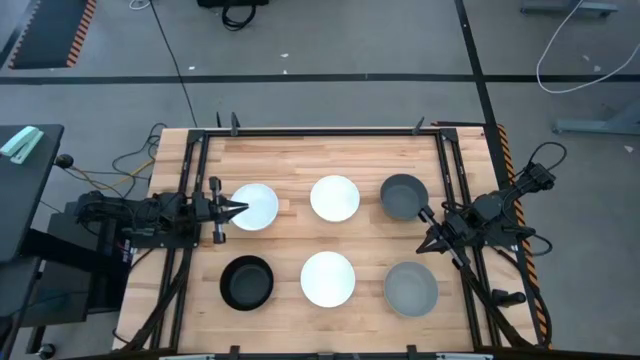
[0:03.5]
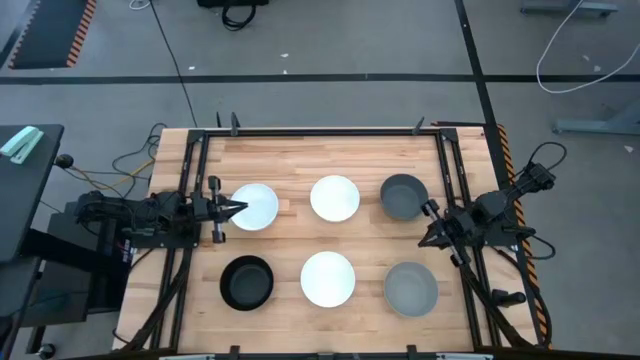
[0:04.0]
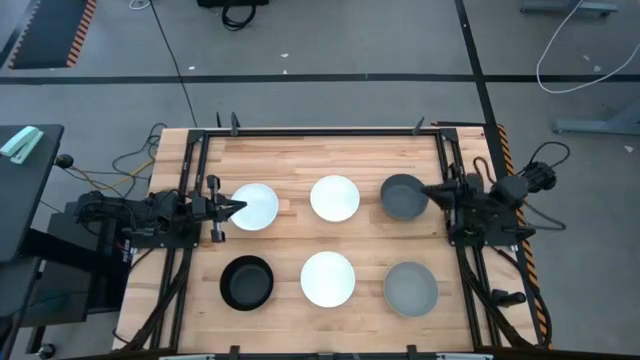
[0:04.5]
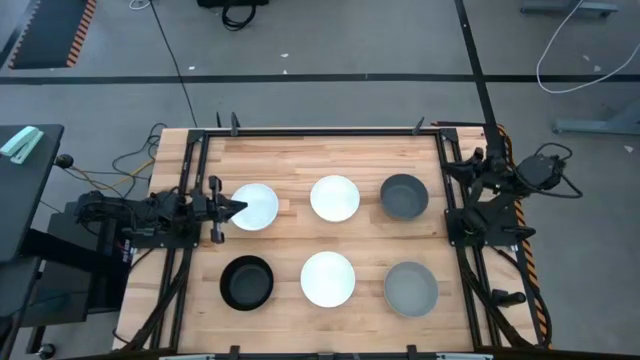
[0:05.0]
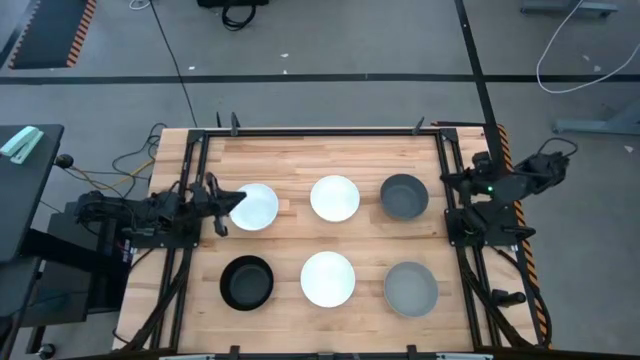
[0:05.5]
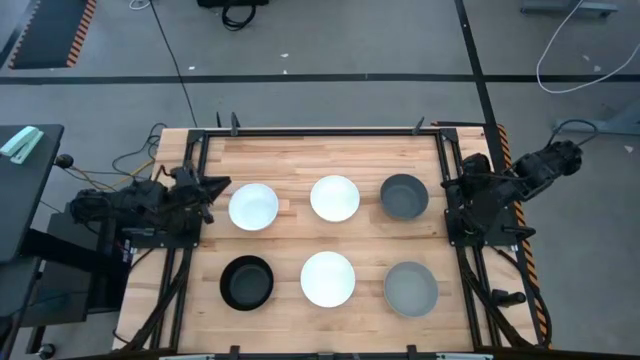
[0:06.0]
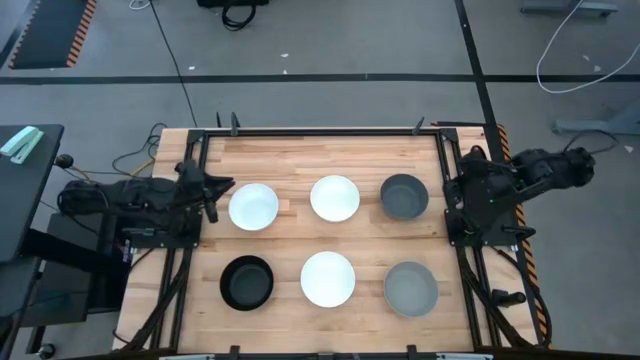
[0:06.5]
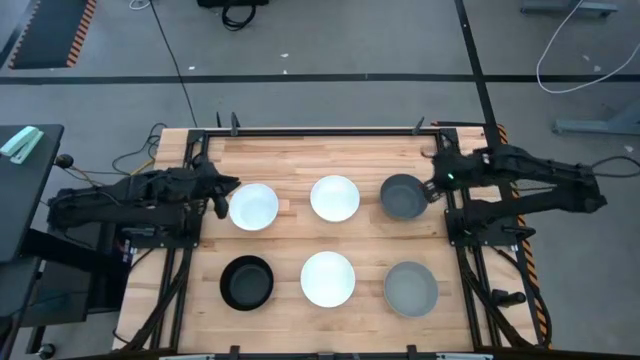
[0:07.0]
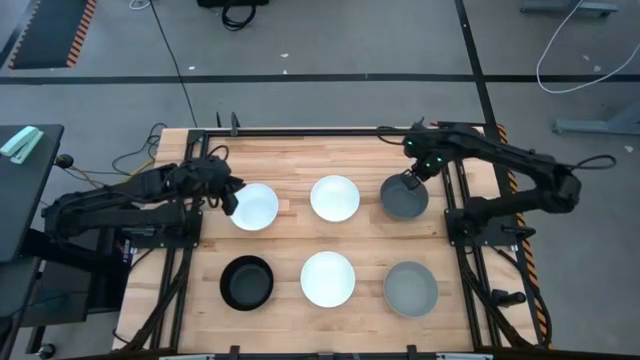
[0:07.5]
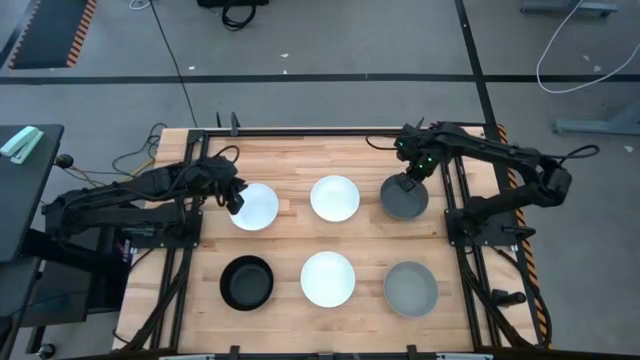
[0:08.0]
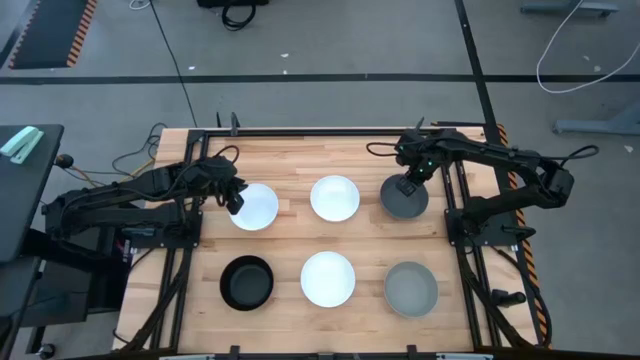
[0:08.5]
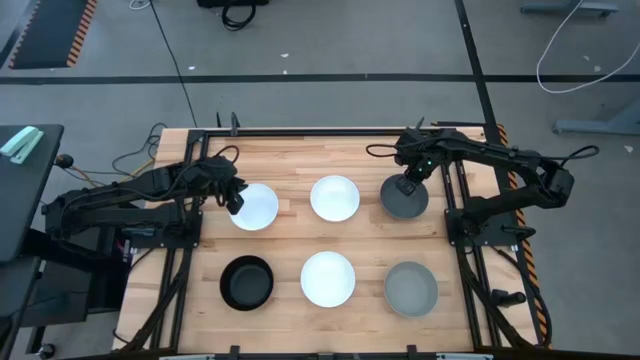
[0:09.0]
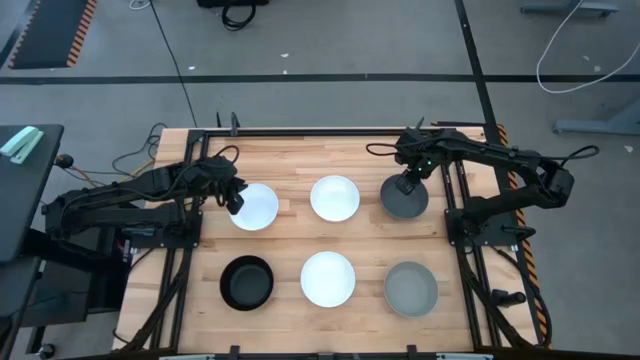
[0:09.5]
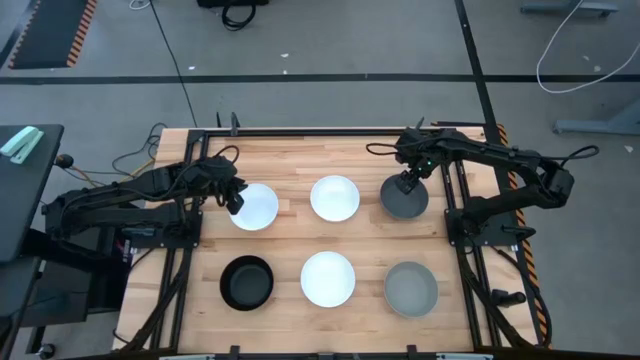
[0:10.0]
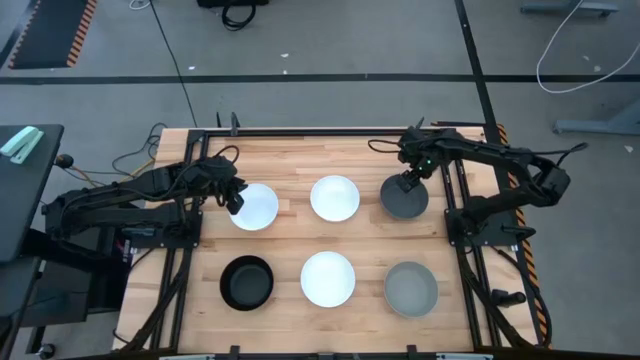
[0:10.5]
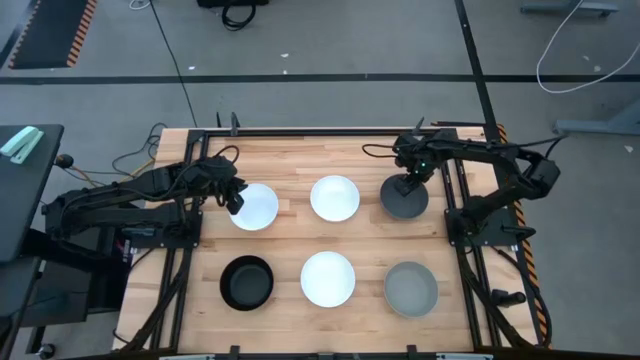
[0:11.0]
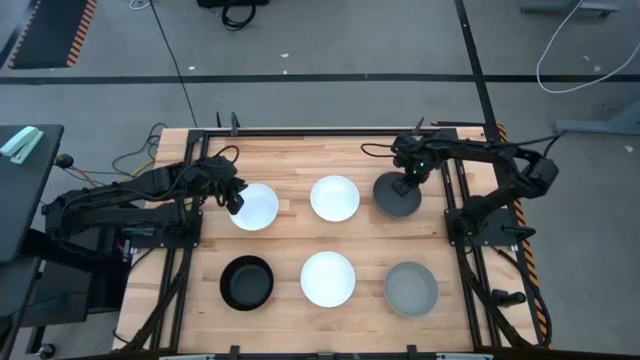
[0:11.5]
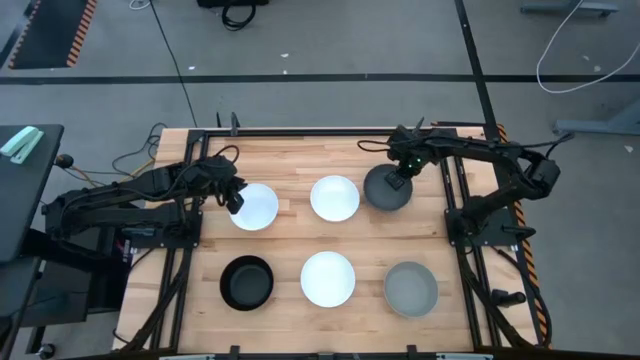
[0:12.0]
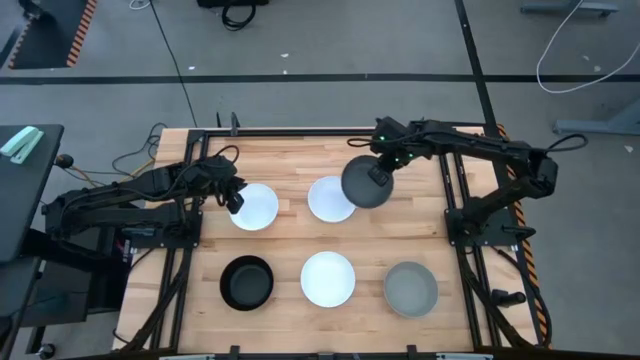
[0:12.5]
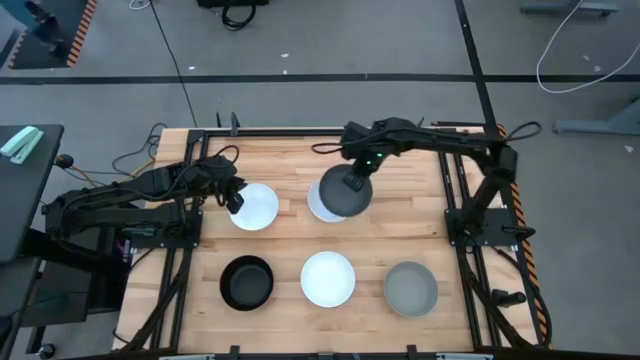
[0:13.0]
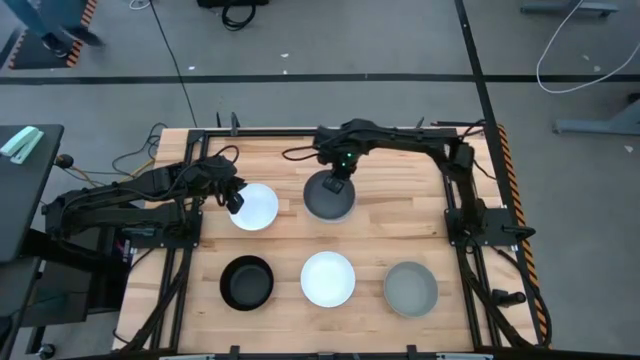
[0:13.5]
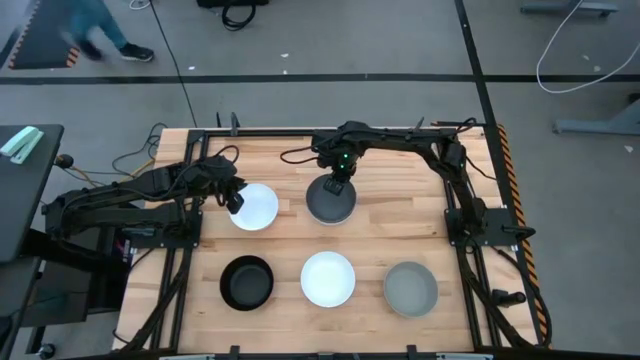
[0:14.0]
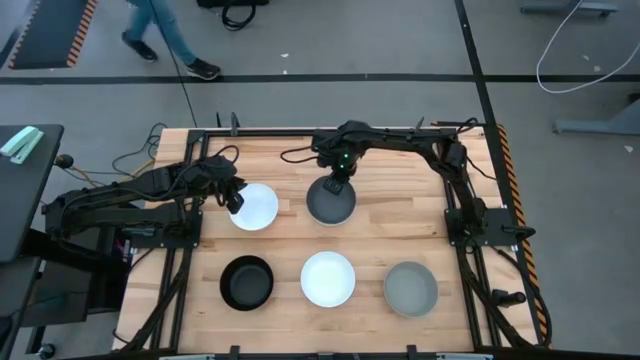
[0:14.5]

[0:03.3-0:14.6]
Task: Nest bowls inside each other
Stack the dark gray bowl on the top right white bowl

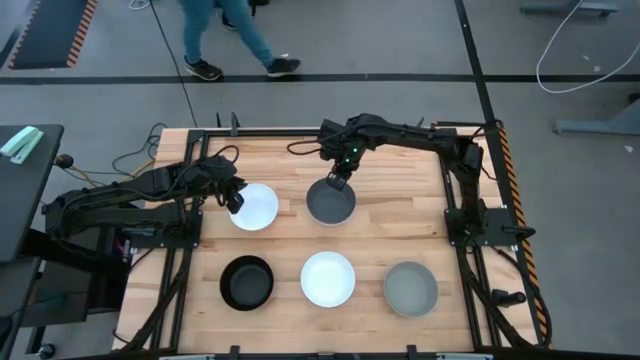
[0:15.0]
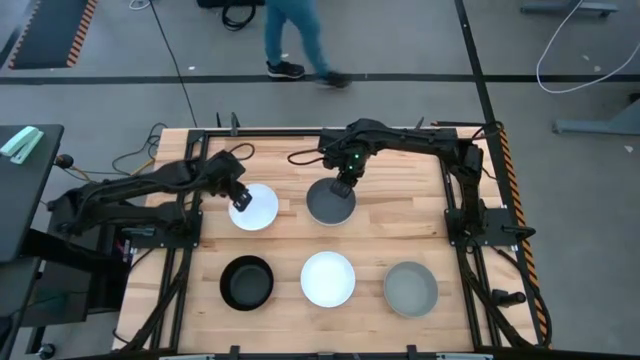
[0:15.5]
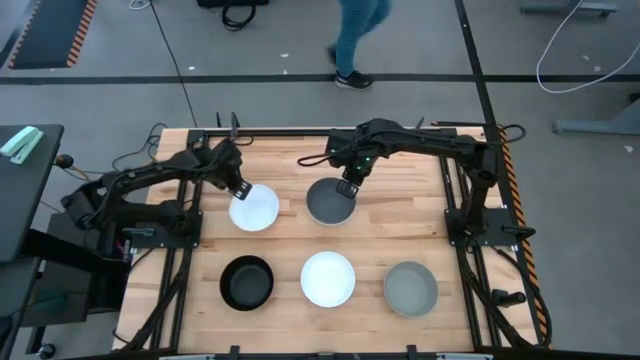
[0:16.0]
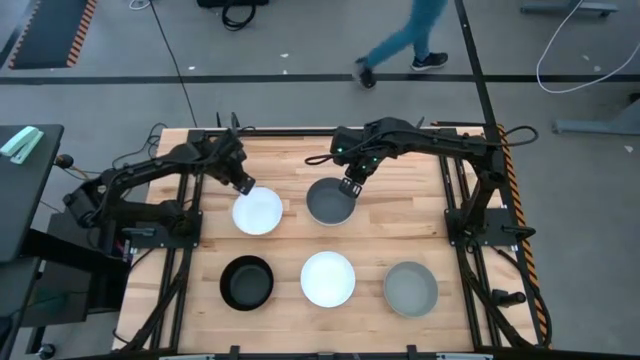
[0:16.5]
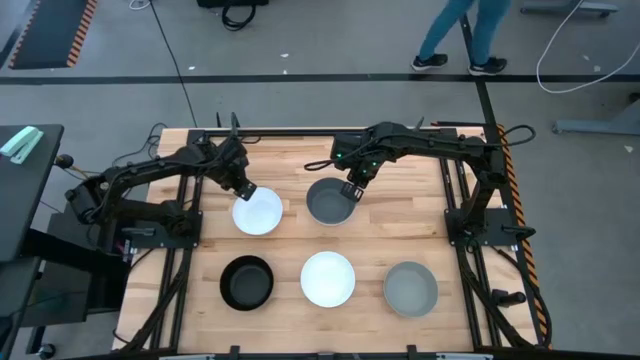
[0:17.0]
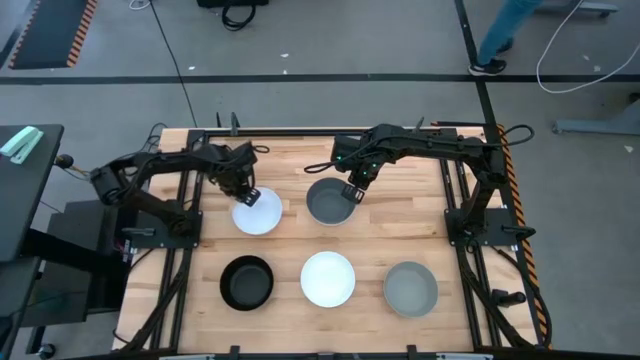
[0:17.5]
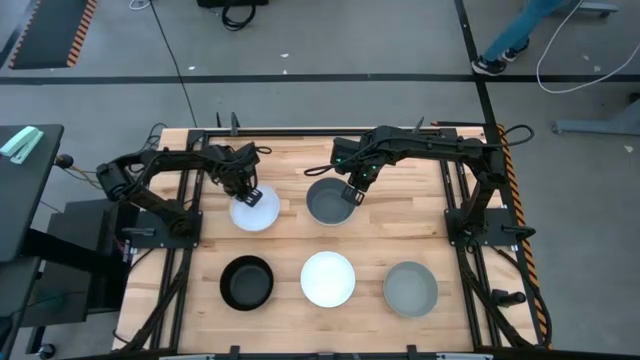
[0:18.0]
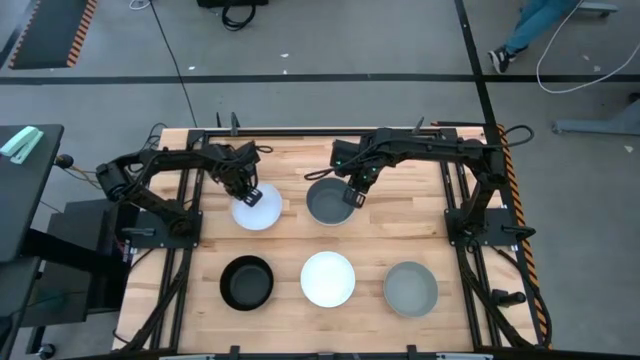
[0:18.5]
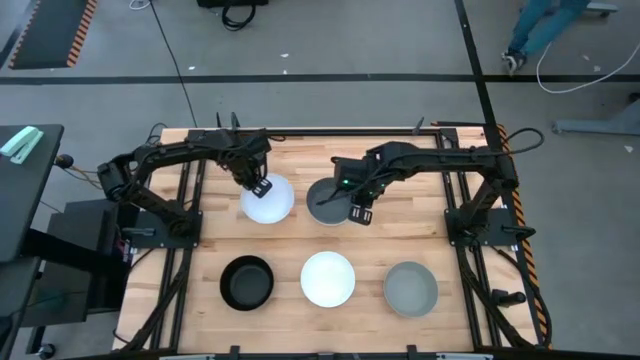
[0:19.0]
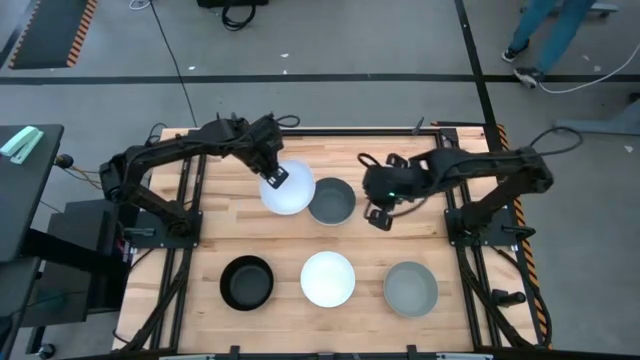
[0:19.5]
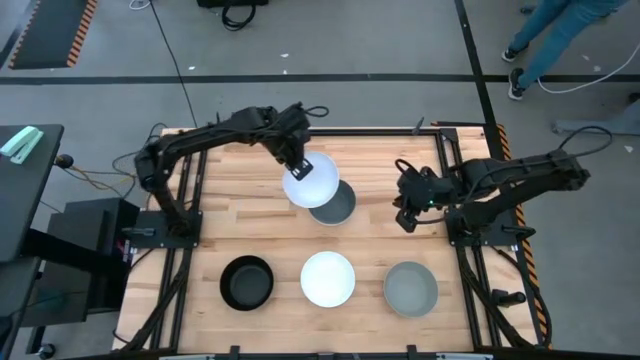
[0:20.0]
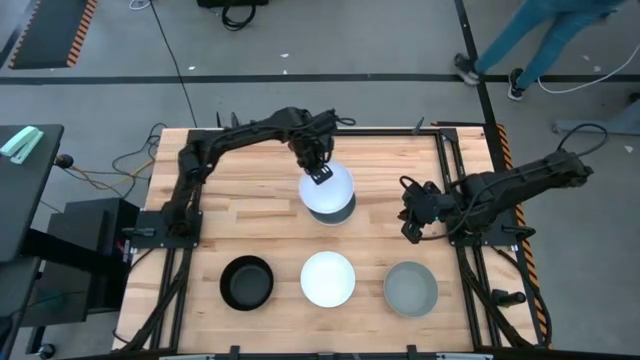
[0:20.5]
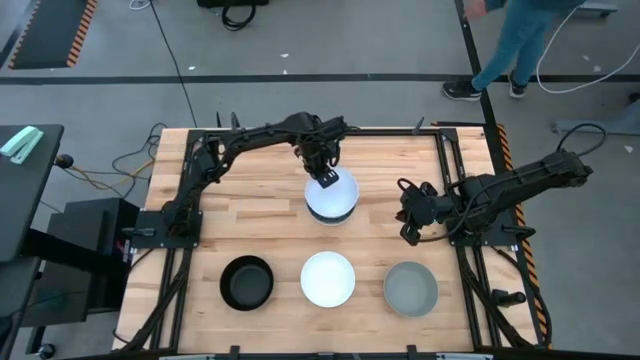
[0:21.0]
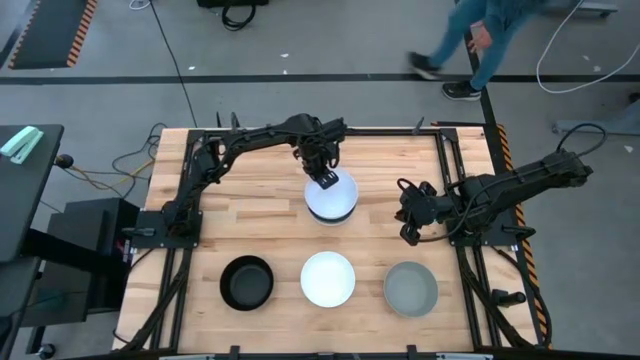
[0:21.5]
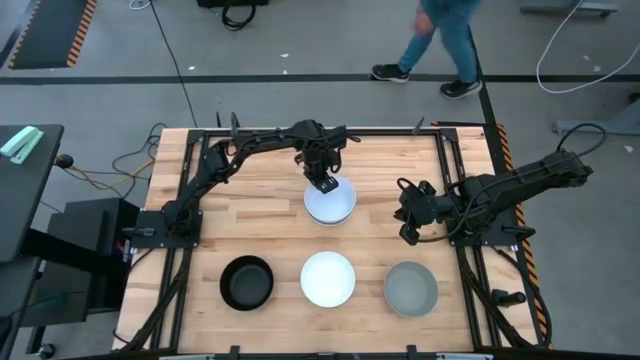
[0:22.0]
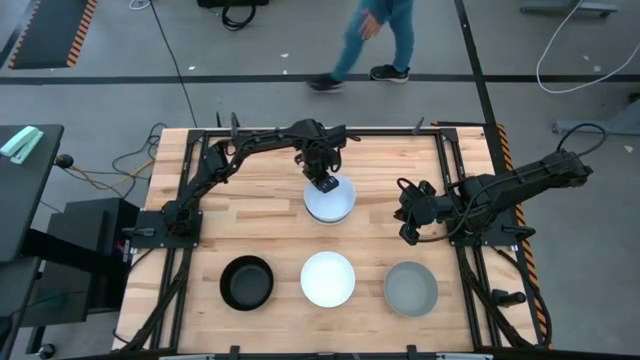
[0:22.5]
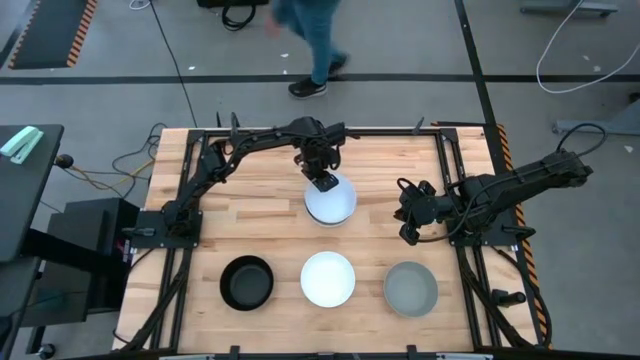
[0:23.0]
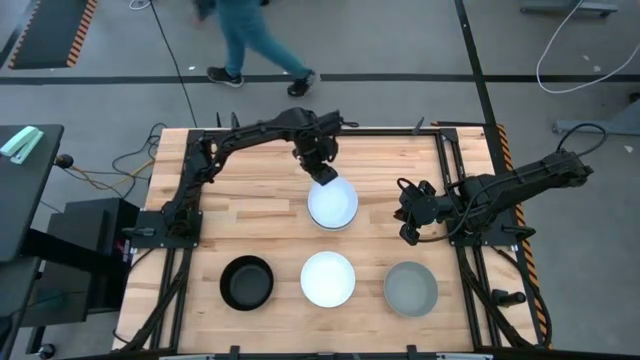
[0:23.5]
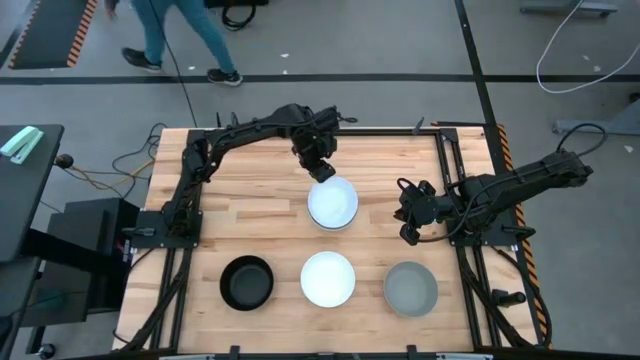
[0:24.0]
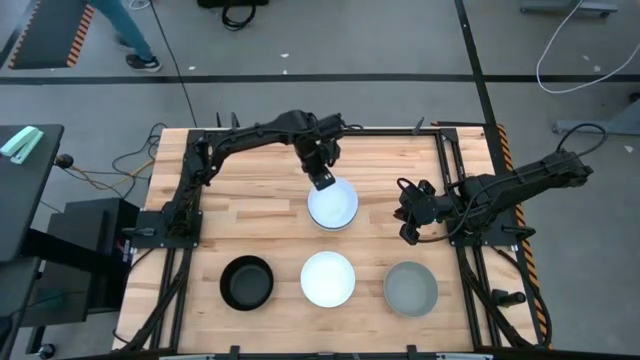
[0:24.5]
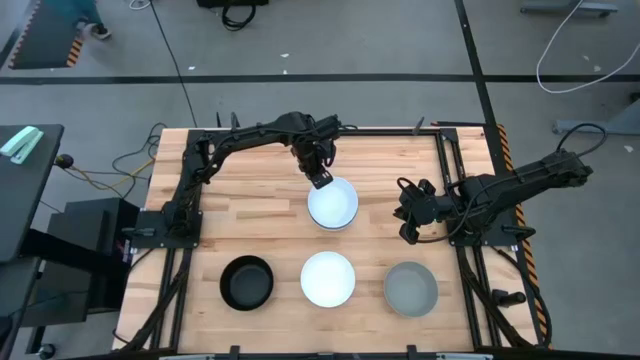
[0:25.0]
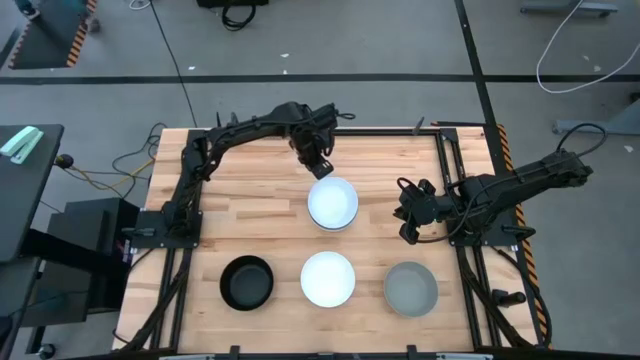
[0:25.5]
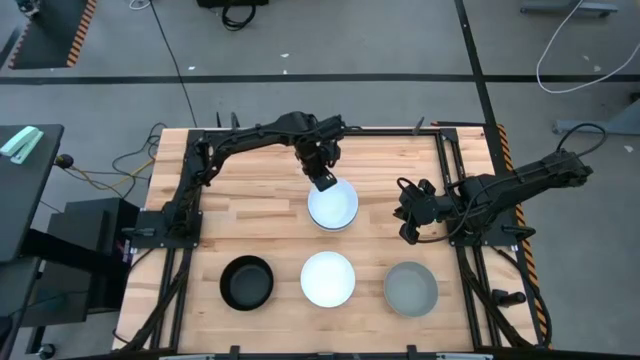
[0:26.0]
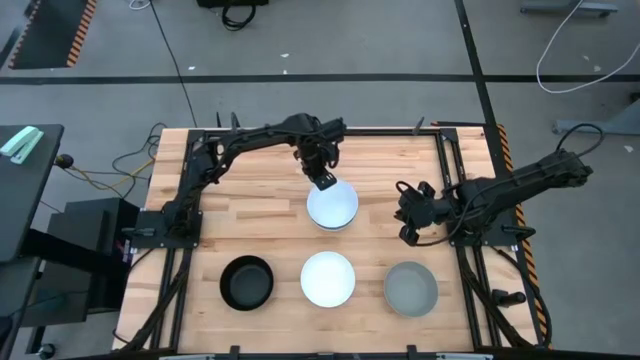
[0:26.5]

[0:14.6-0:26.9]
Stack the top white bowl on the dark gray bowl
